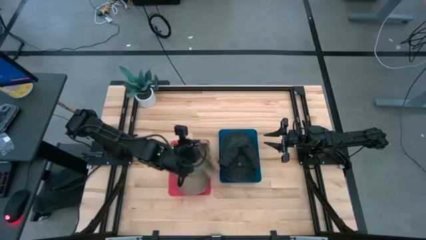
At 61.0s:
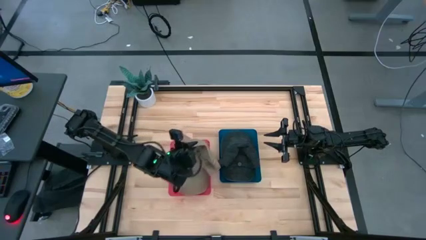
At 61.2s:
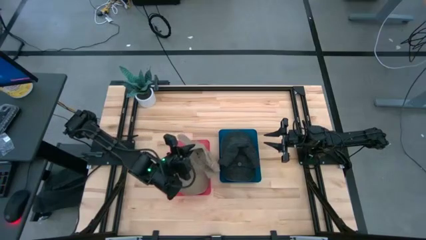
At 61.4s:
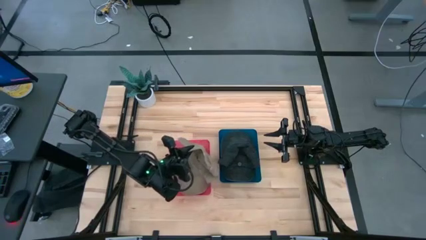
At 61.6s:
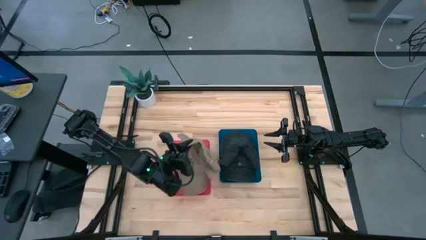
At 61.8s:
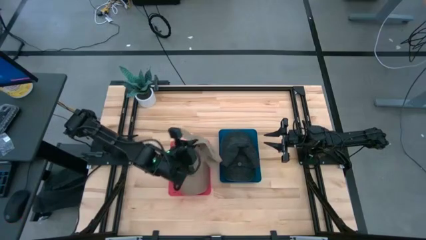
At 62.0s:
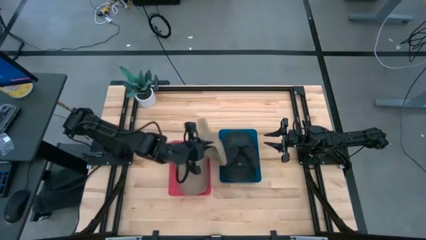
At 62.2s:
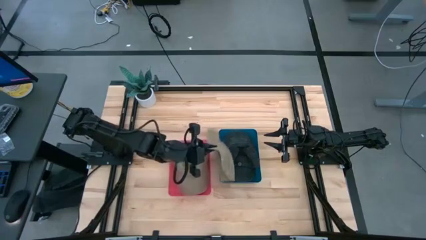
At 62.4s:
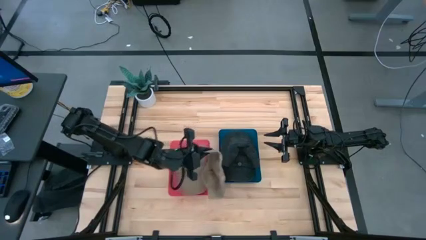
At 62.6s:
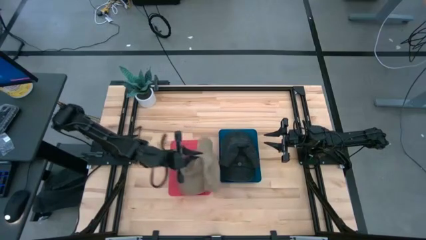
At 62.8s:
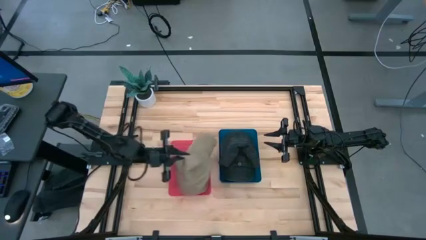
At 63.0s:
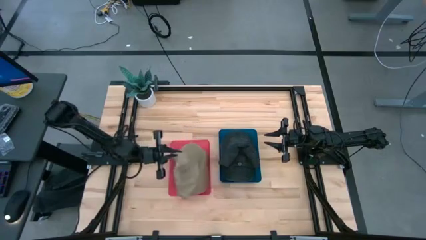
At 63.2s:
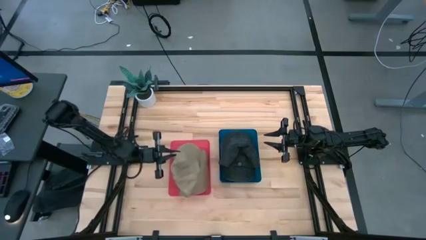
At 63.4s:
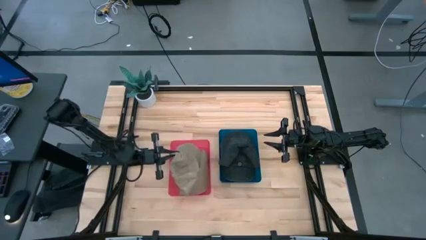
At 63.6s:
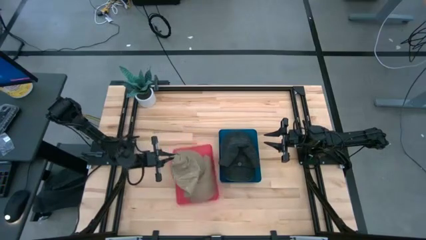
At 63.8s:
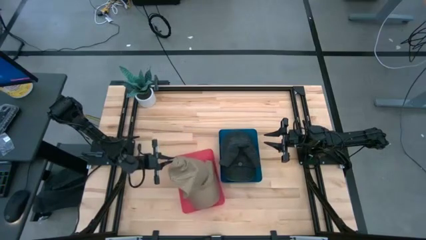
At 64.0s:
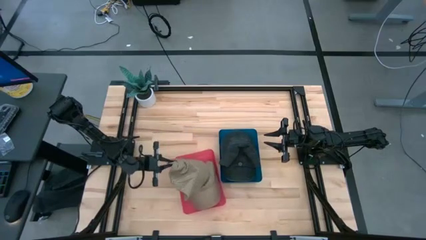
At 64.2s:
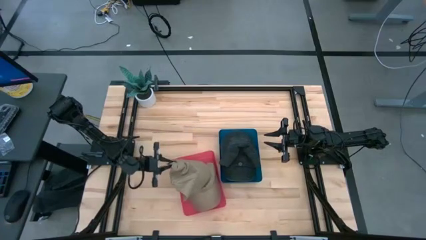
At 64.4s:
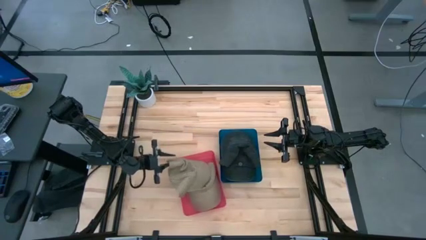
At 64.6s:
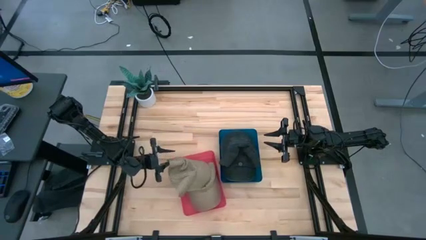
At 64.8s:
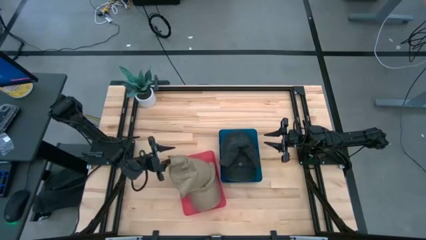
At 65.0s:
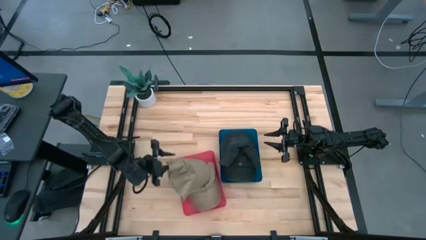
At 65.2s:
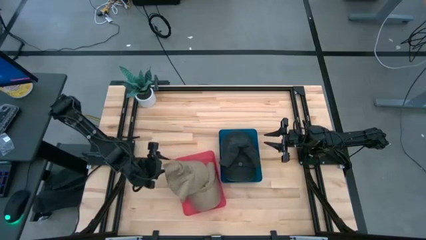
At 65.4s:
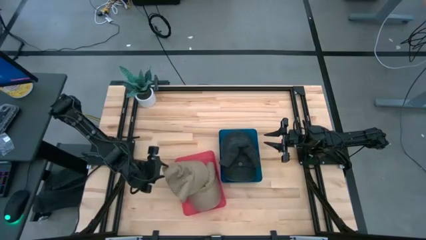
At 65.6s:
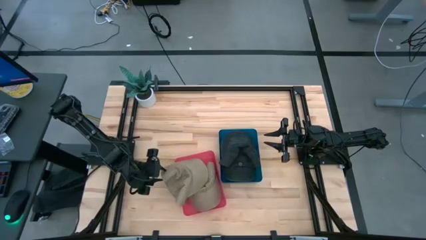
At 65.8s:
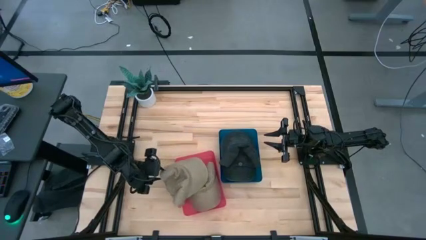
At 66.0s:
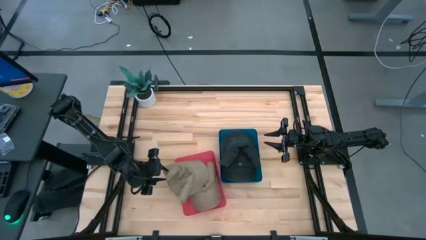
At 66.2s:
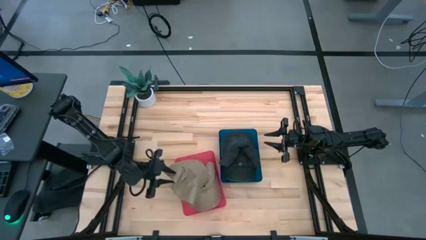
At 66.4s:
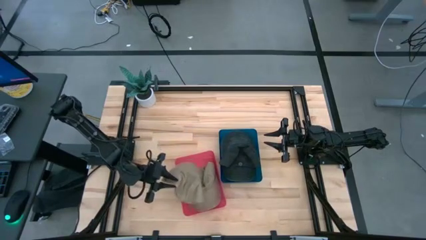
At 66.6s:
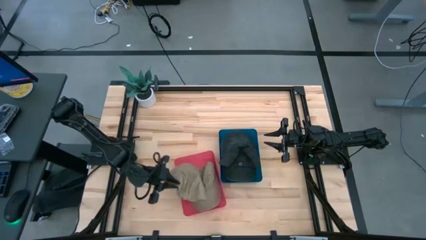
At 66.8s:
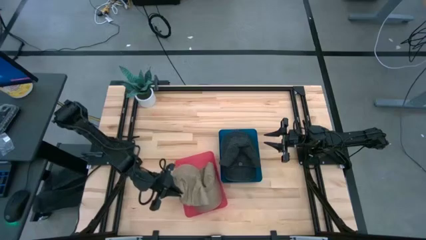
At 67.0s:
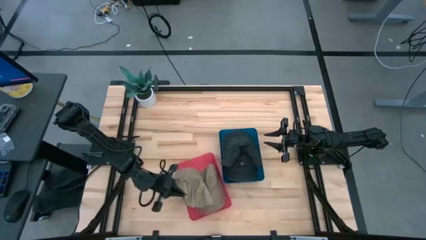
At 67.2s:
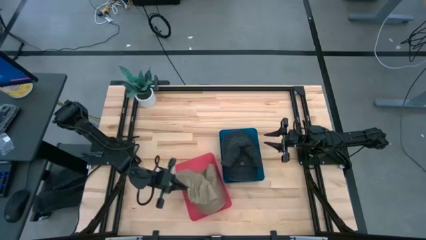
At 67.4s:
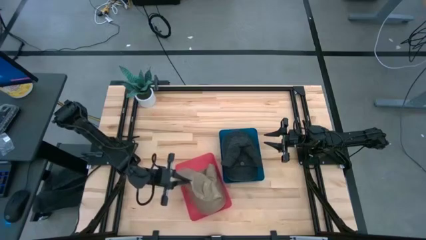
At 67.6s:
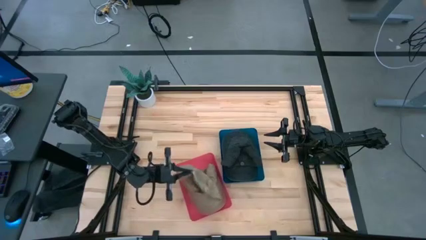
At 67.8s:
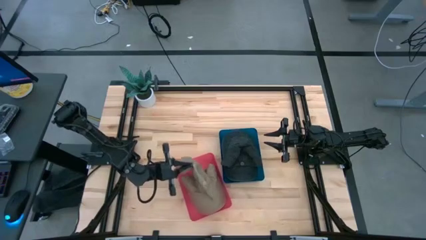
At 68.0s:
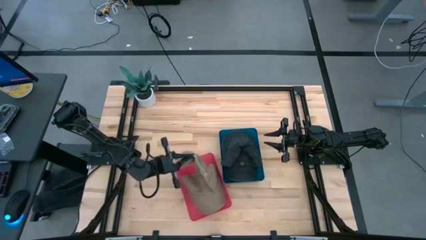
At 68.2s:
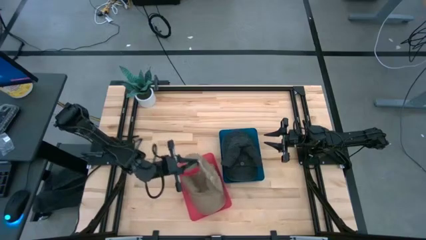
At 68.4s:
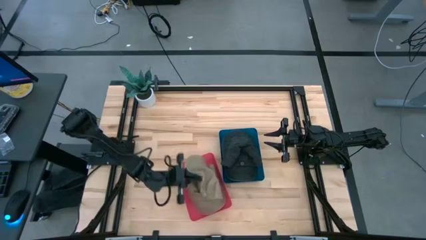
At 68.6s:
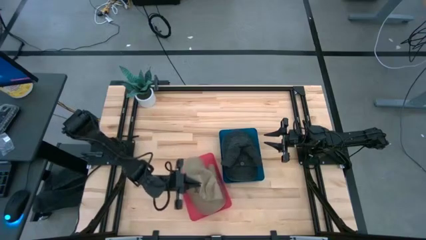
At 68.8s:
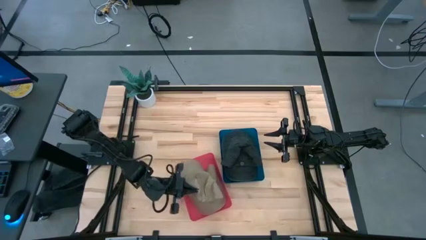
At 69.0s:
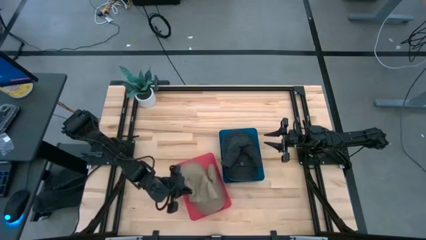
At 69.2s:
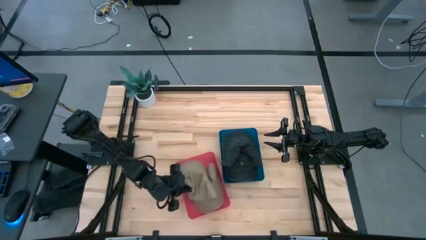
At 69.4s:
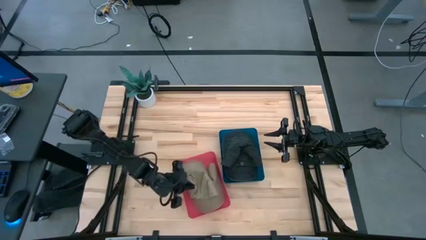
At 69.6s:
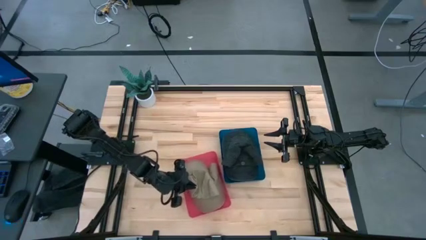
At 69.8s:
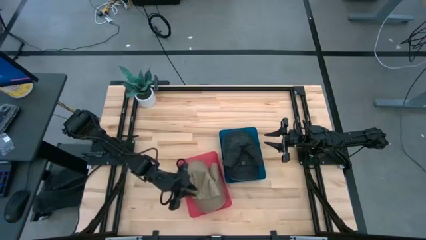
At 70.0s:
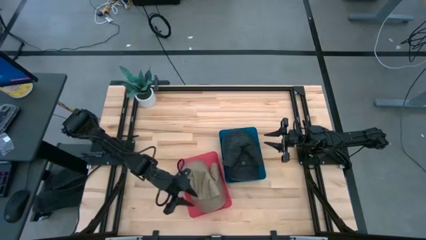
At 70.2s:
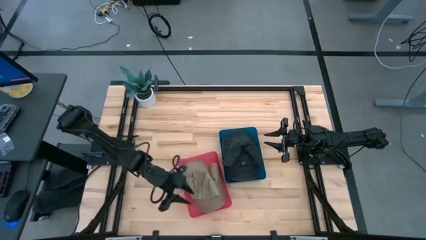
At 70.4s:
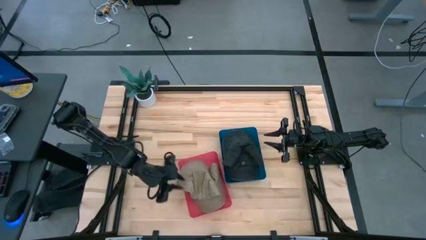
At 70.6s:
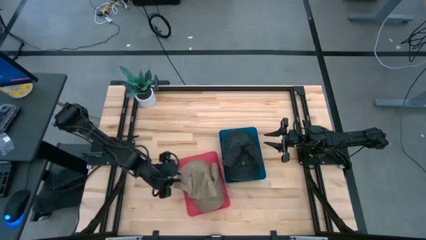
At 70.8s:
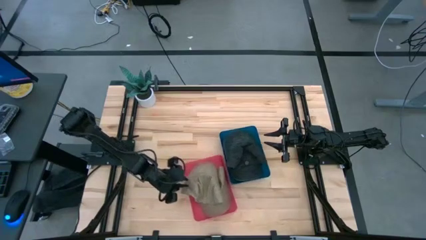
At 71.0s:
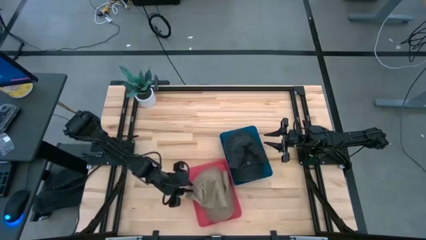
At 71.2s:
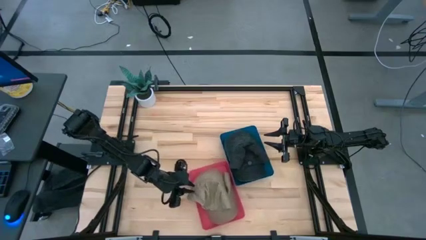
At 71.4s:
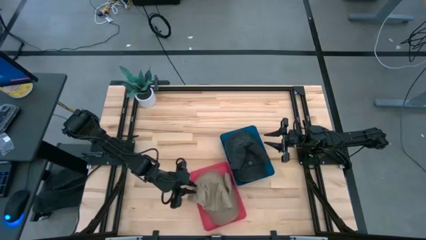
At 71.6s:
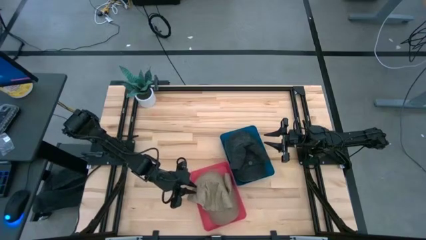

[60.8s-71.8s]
Task: Pick & Place hat
Put the brown cap into the red bin

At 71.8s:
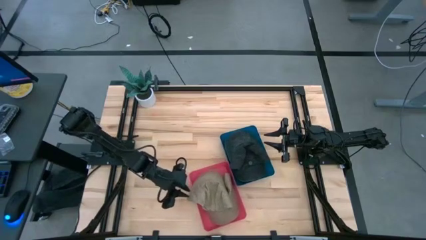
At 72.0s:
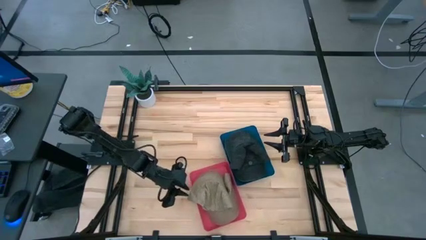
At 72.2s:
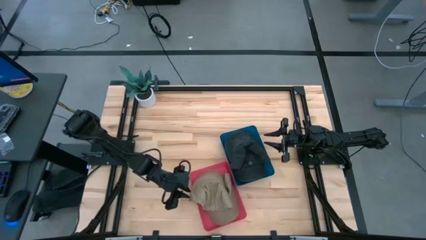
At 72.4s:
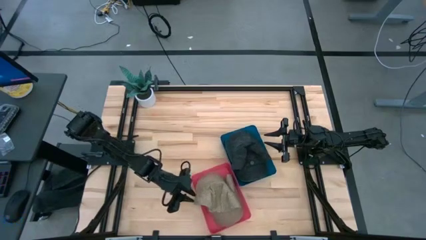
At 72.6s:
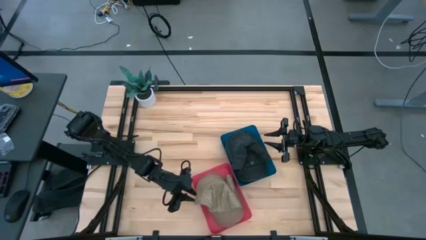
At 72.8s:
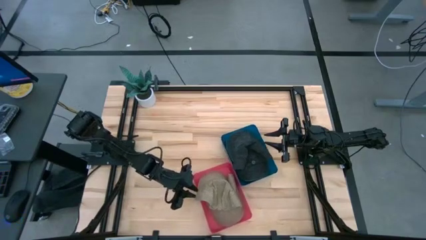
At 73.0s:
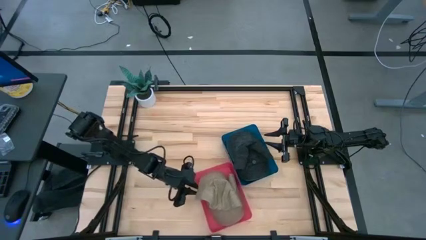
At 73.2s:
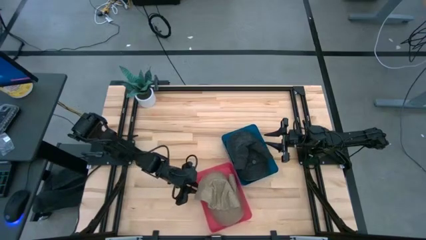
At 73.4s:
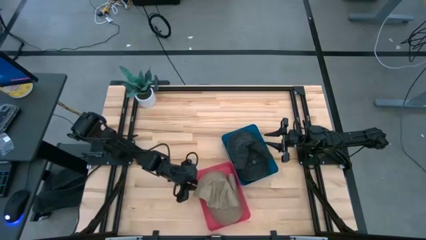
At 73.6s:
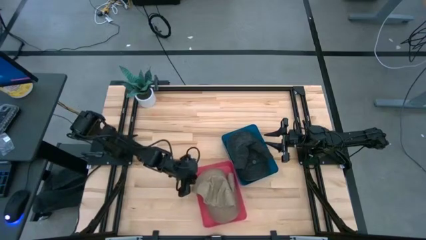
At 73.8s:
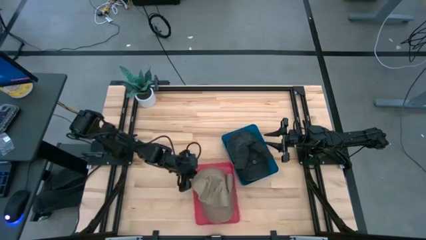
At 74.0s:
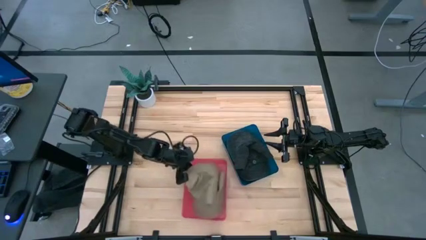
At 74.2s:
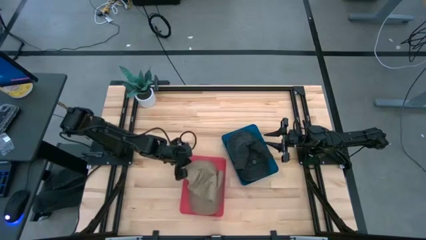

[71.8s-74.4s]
Adjust the red bin

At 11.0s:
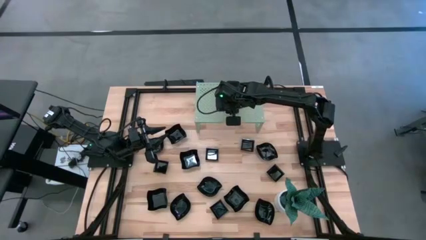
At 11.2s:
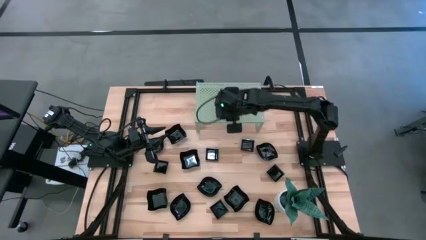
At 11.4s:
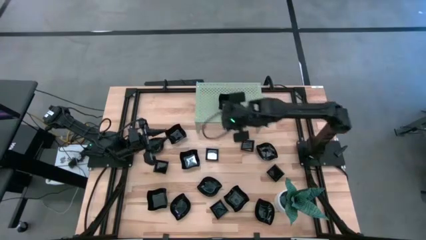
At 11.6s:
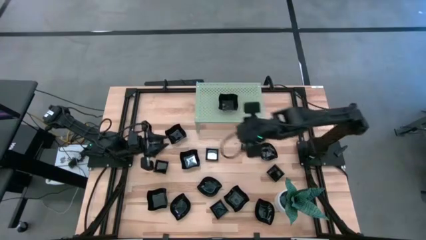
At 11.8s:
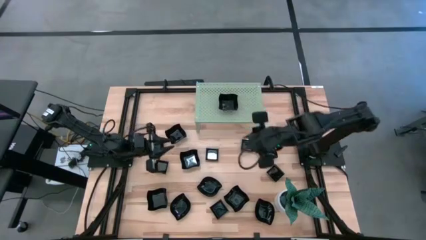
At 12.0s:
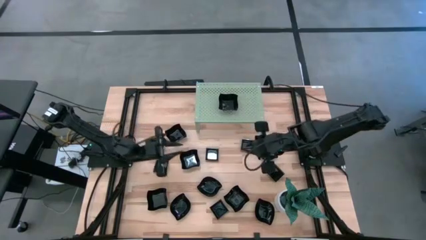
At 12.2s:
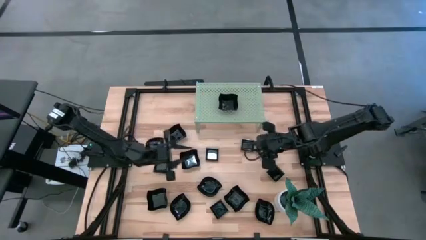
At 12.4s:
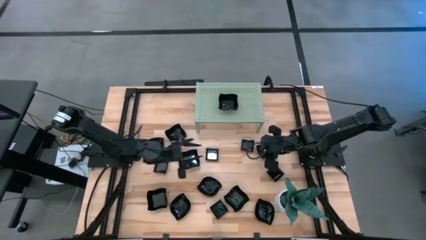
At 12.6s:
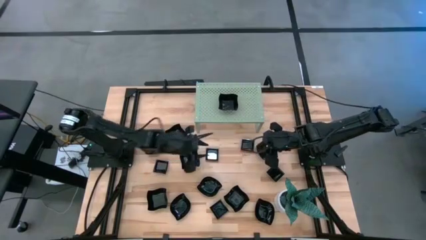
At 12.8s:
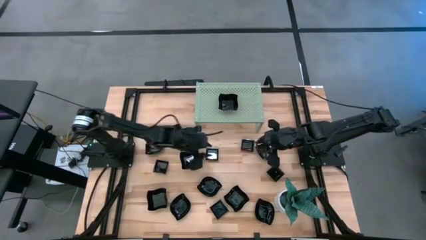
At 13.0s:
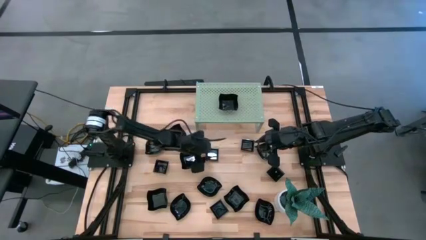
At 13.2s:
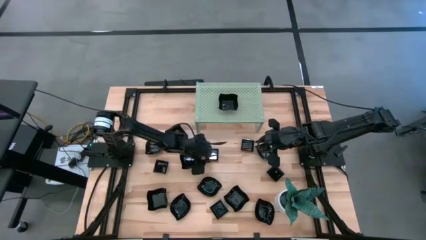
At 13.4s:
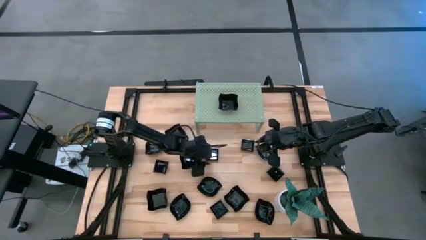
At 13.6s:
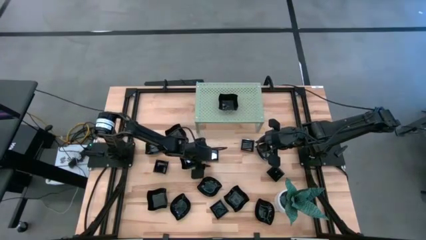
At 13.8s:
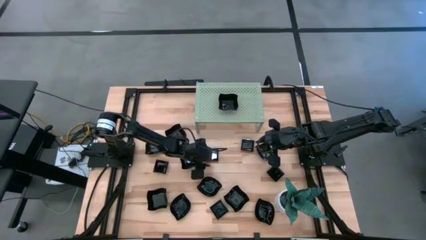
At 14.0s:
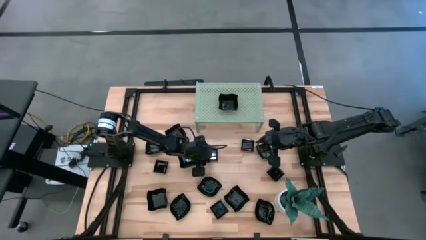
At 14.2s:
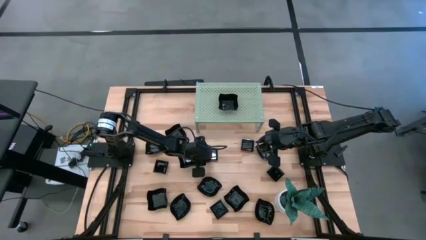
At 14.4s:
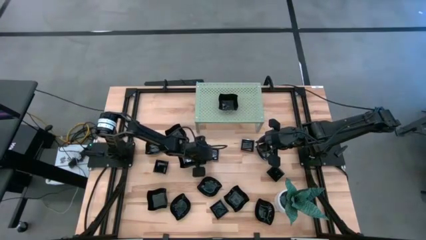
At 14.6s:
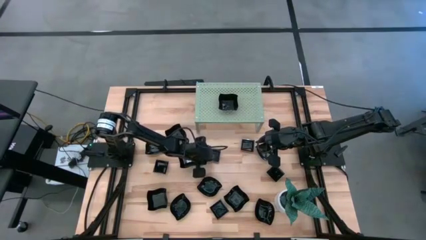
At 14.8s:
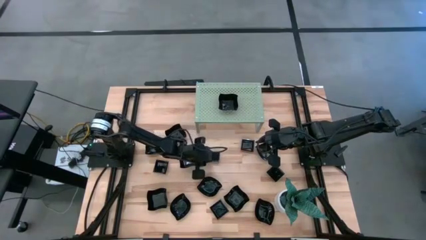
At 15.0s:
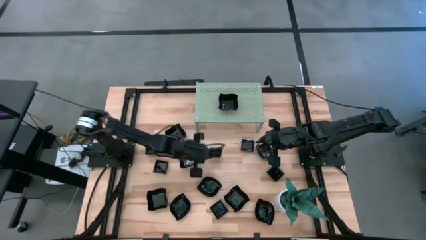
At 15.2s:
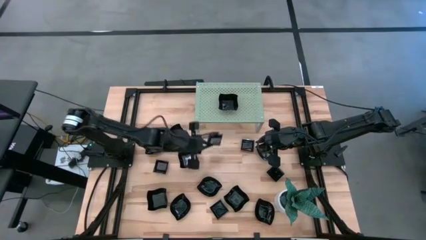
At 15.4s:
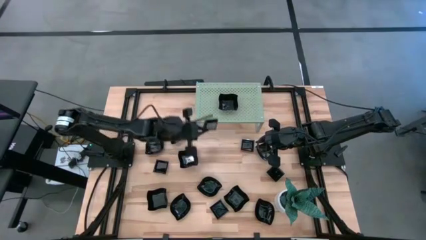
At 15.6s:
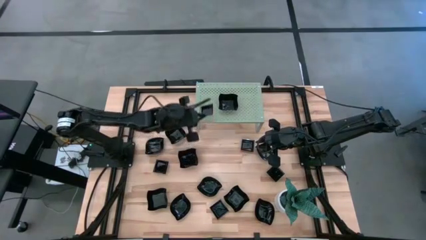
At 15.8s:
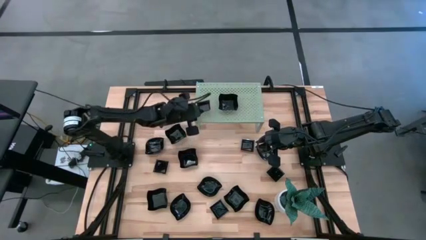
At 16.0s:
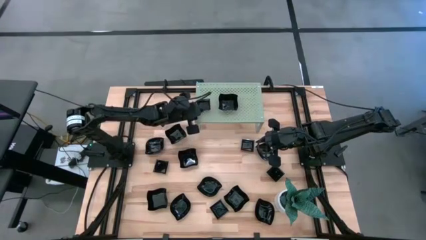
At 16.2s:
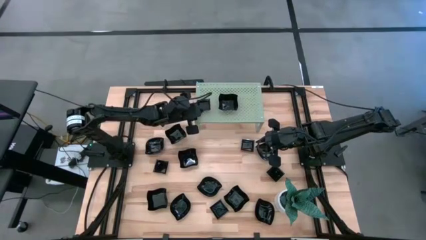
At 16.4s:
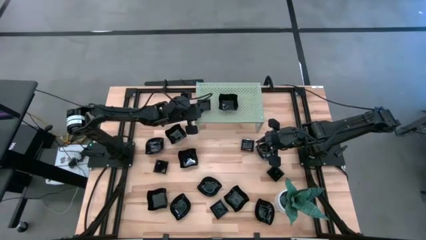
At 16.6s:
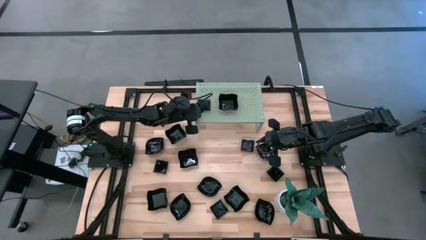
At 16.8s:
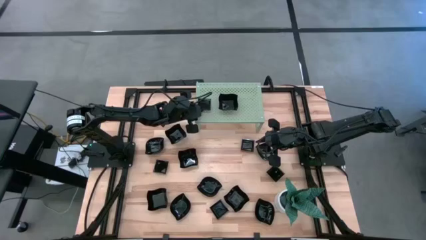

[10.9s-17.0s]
Task: Pick & Place Mini shaped plates
Put the square plate on the shelf
